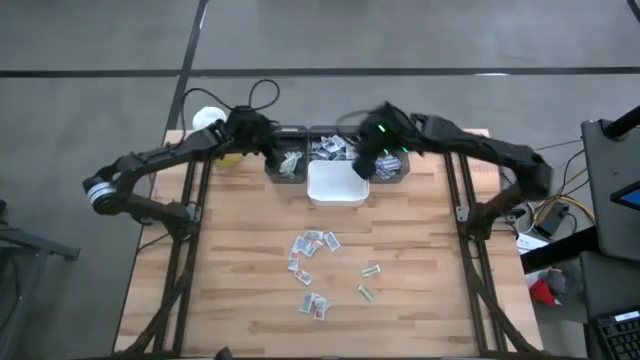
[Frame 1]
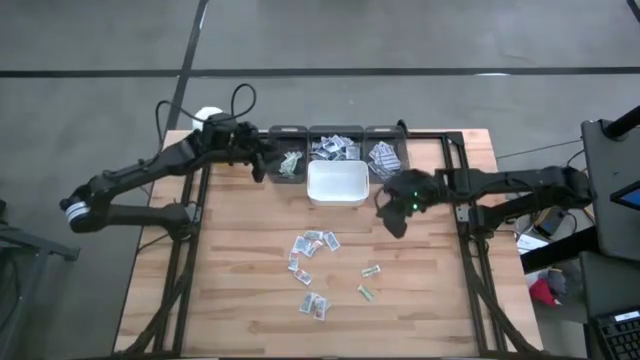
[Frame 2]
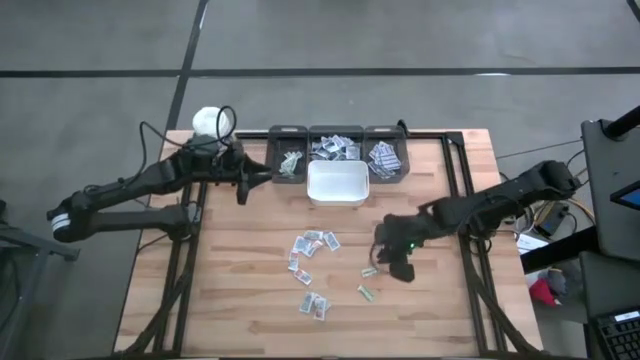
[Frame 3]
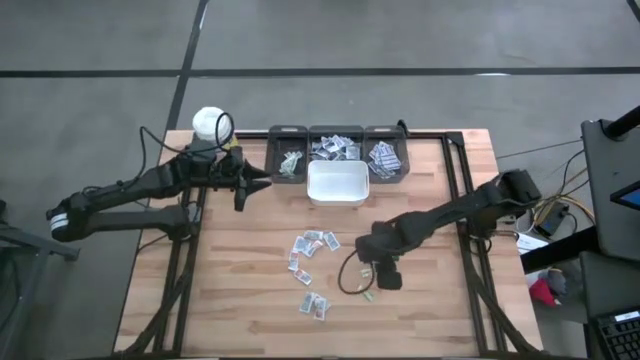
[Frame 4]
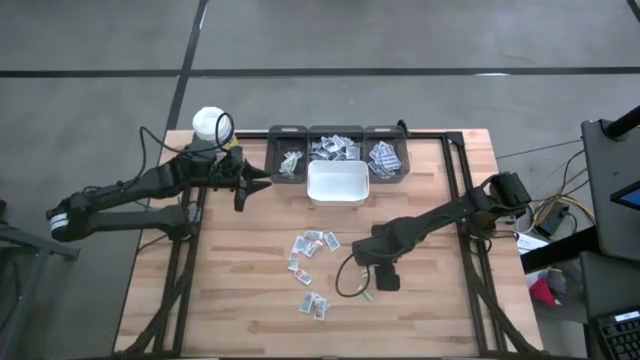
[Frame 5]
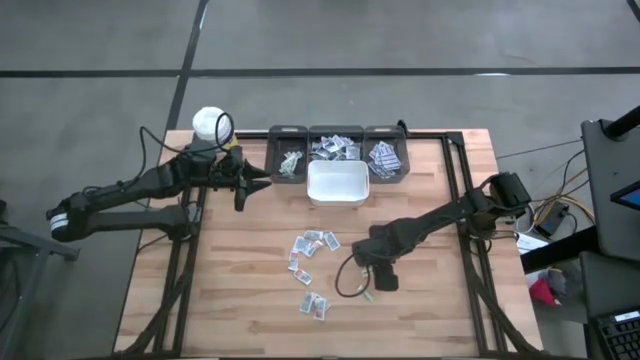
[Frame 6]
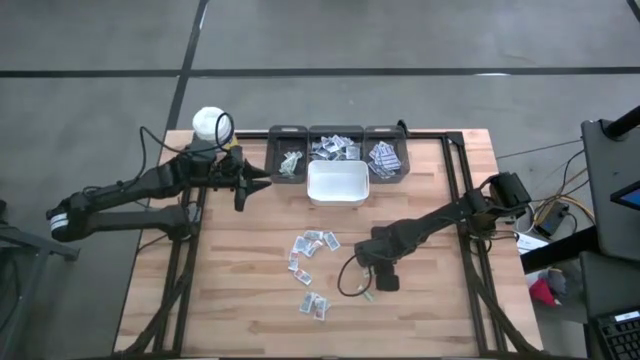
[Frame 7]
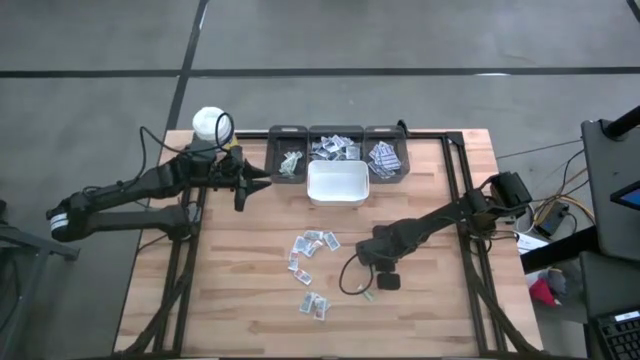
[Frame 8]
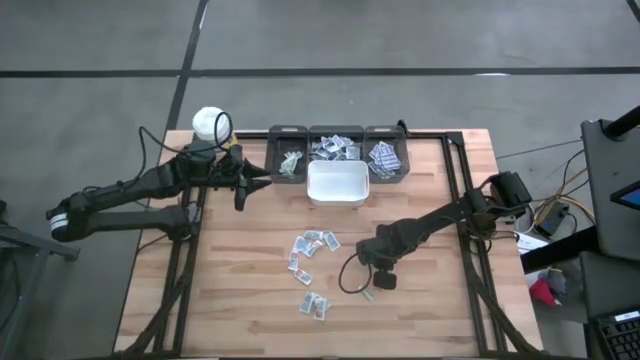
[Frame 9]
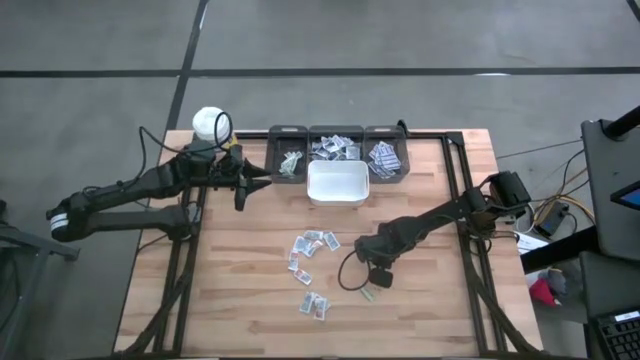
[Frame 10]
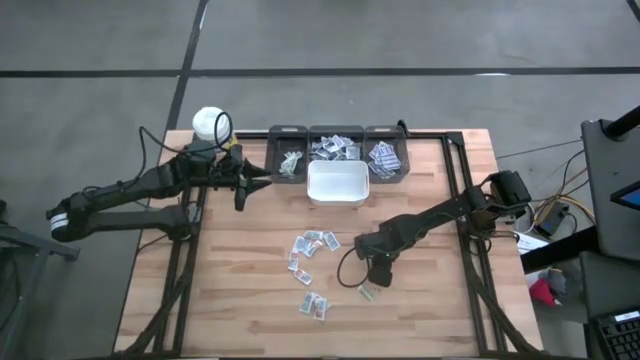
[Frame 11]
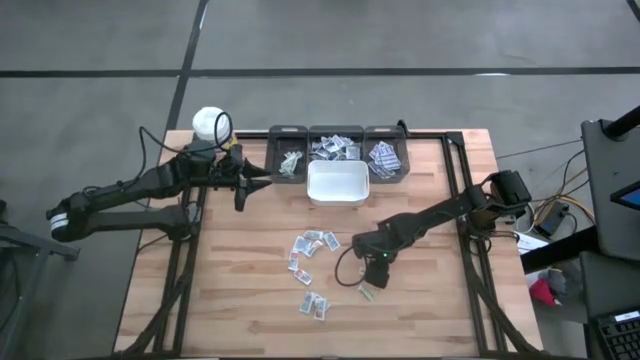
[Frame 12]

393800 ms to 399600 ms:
Task: Pick & Place First Aid Supplies
Put the top green bandage pack into the left black bin

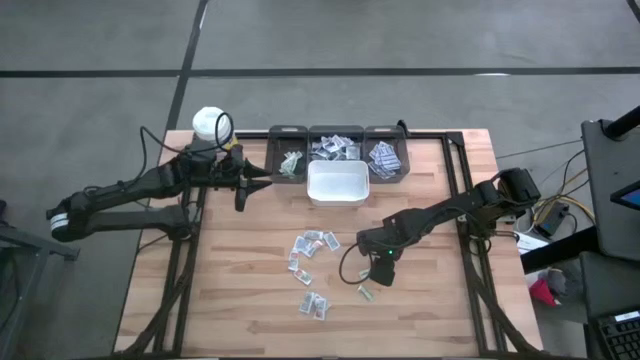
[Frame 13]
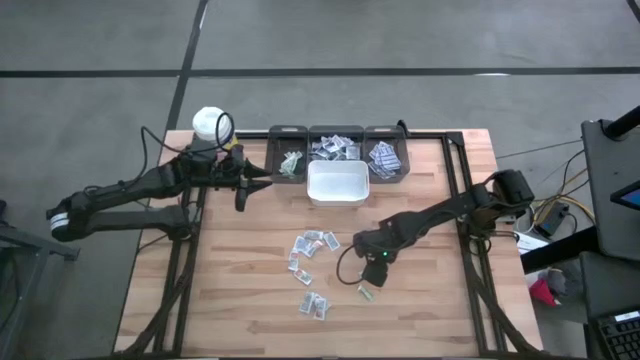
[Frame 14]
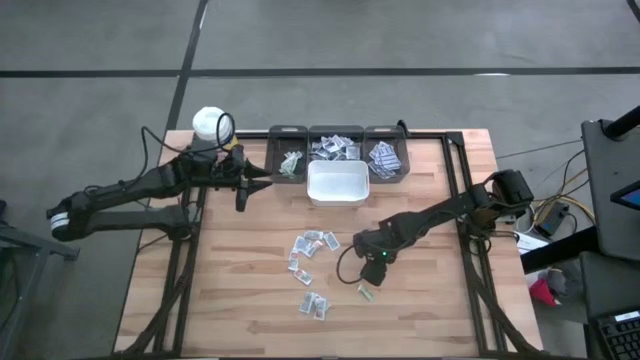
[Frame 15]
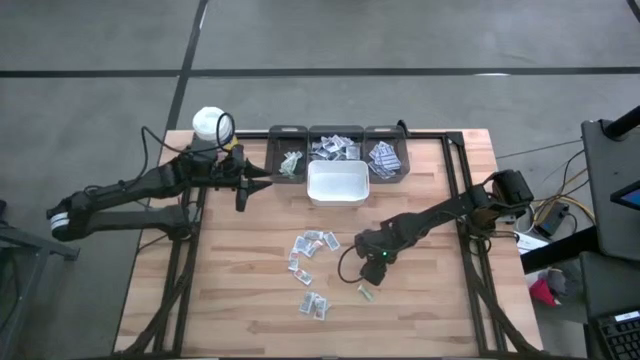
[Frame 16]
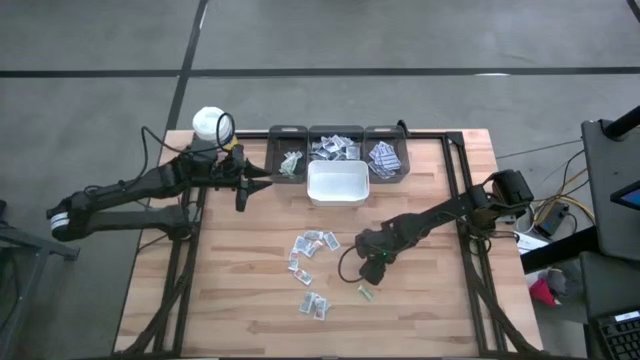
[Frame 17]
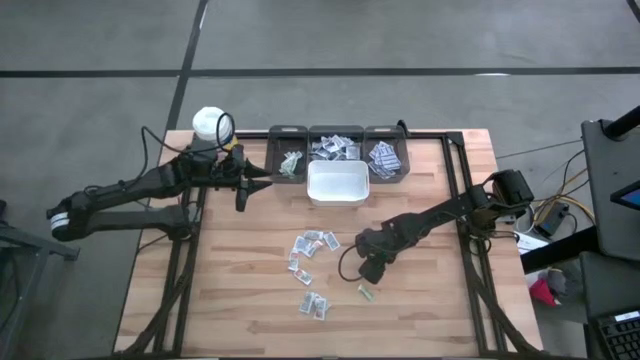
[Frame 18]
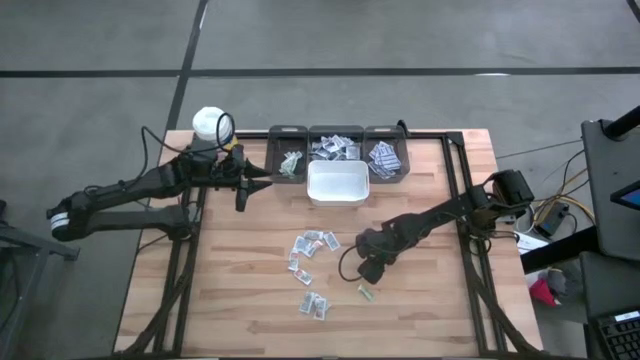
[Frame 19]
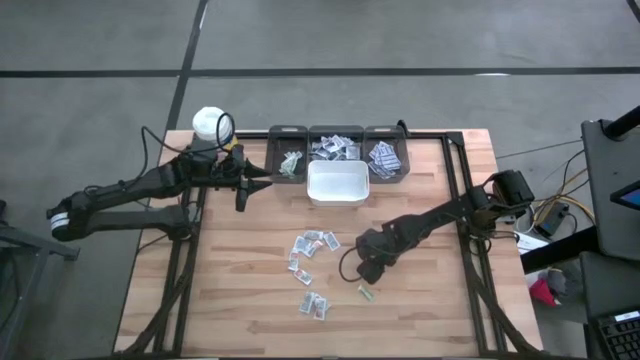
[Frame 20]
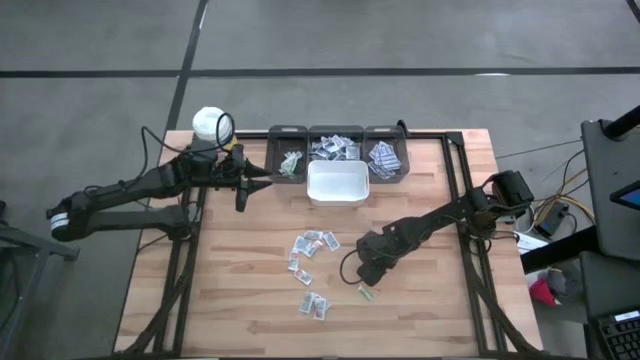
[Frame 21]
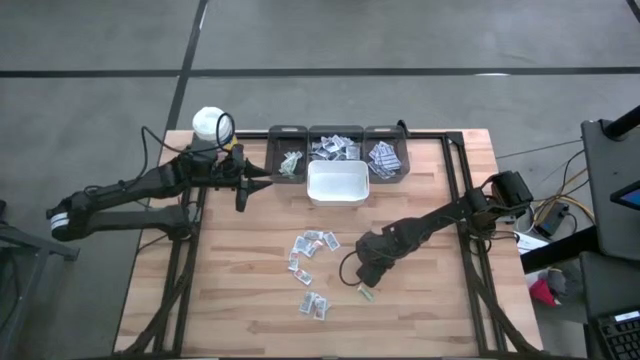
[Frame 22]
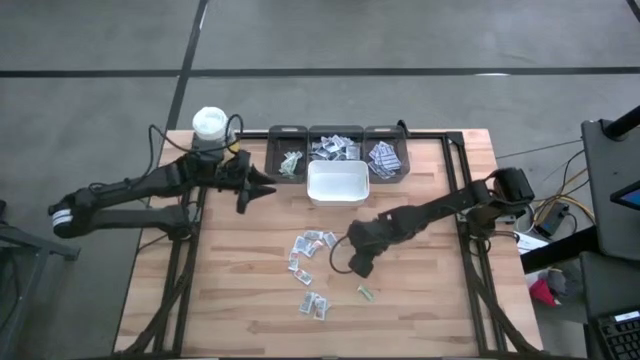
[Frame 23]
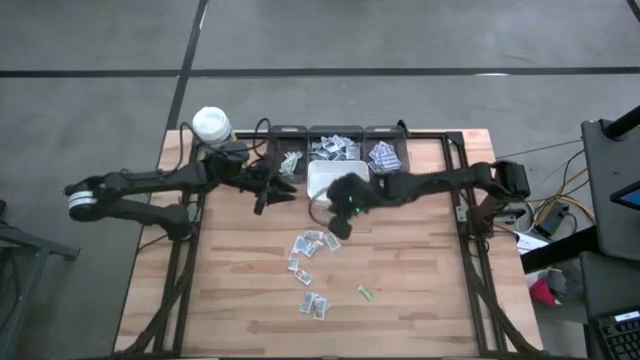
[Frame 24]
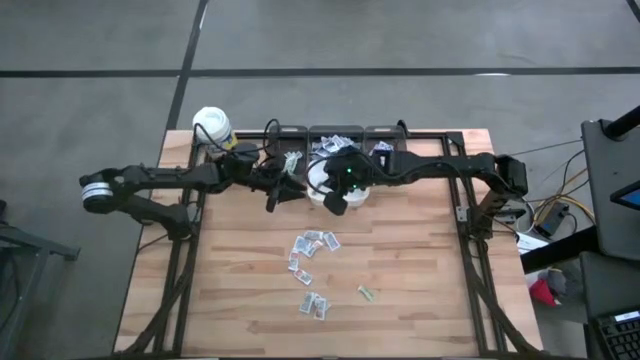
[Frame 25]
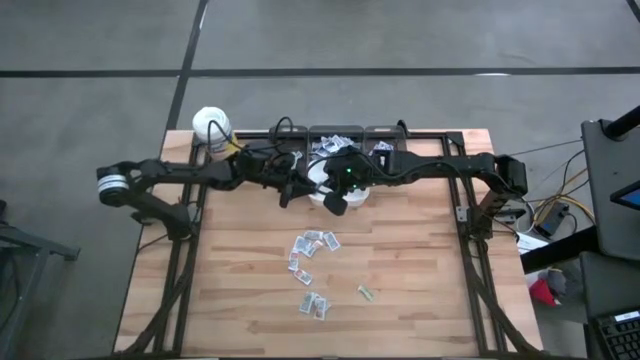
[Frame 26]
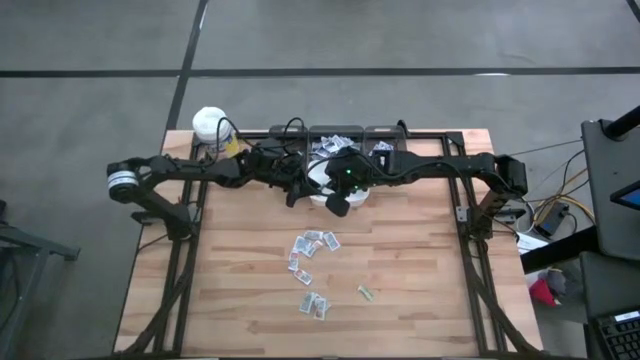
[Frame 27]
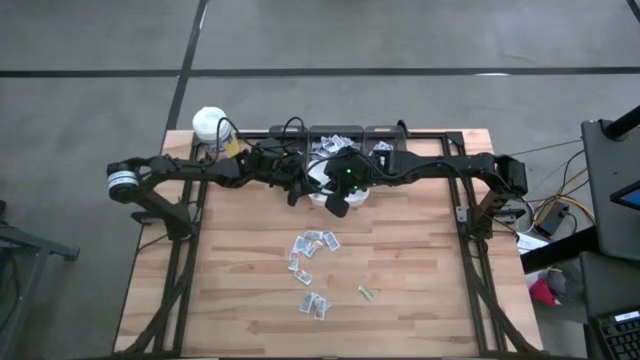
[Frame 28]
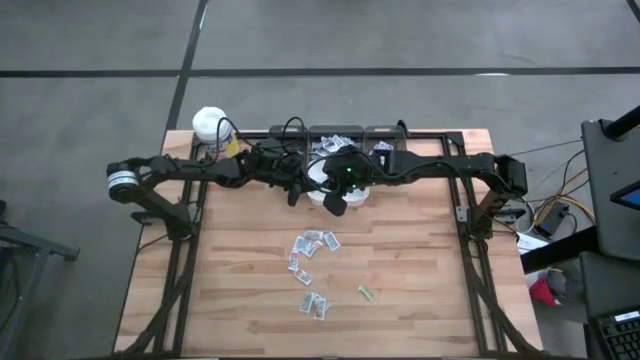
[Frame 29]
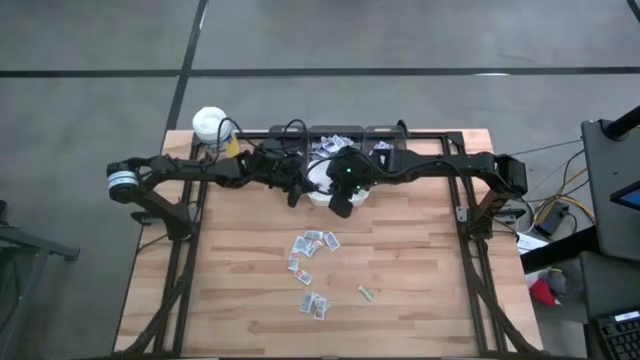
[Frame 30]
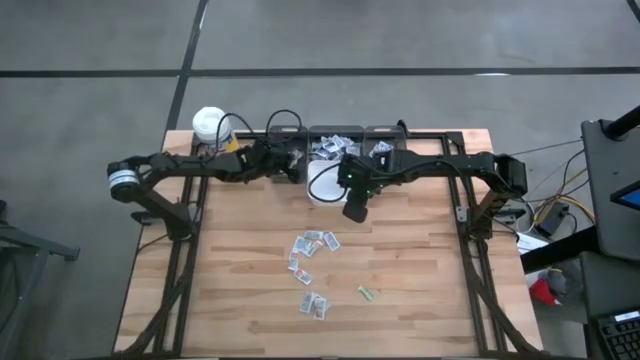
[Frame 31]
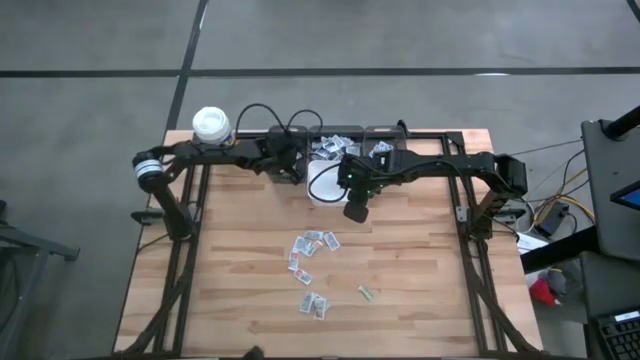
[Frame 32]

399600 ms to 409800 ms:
Put the green bandage pack into the left black bin

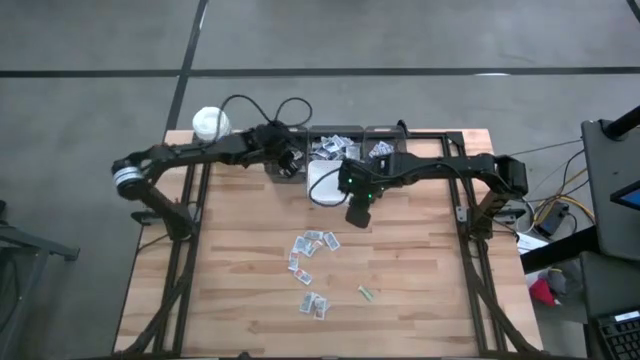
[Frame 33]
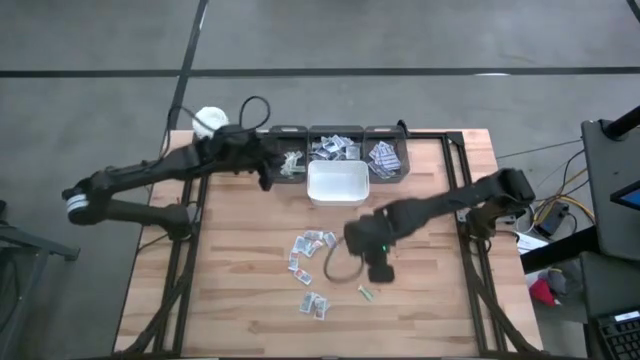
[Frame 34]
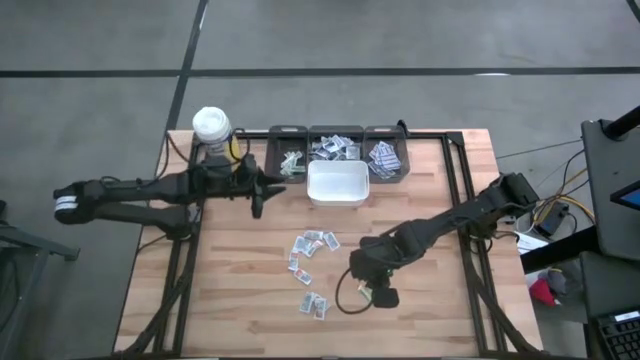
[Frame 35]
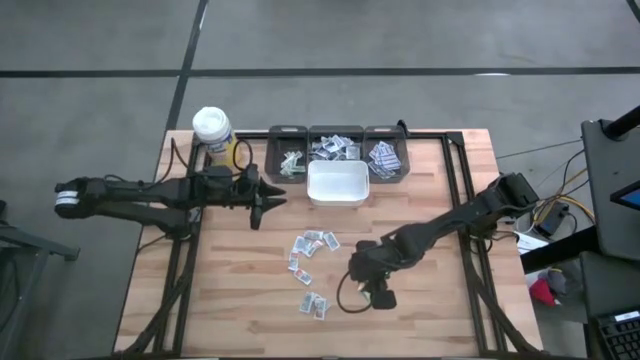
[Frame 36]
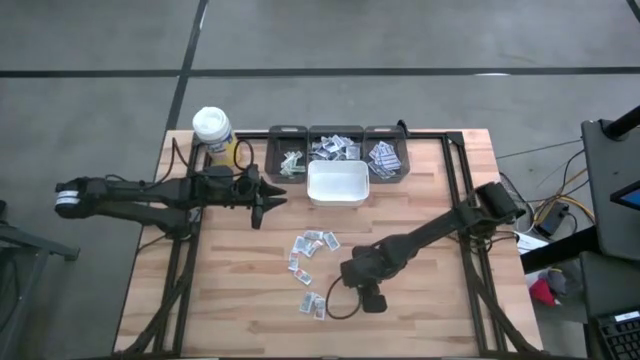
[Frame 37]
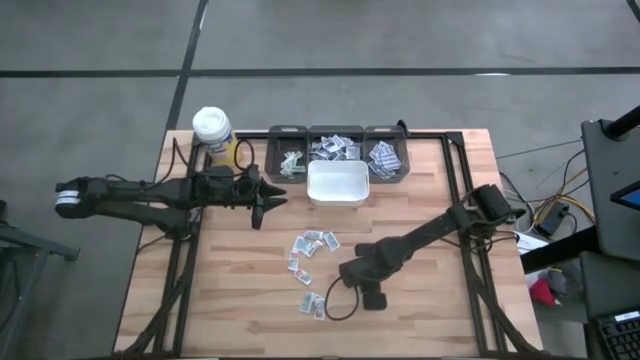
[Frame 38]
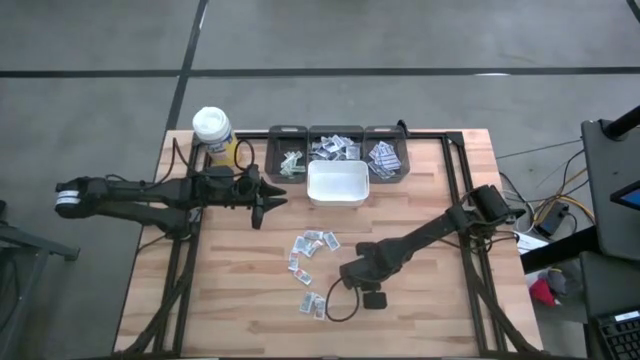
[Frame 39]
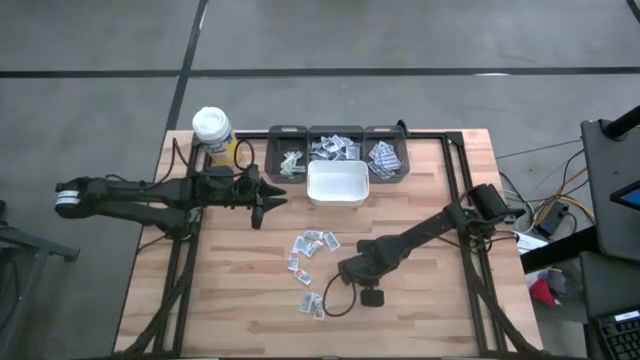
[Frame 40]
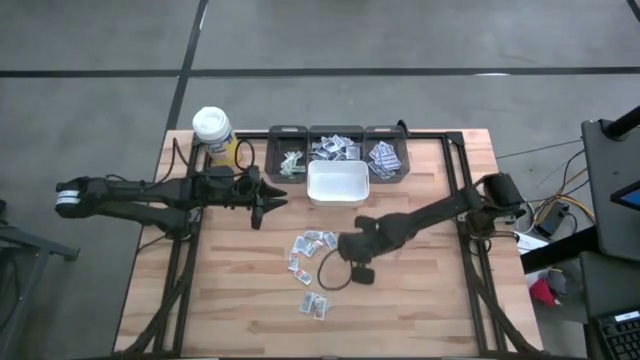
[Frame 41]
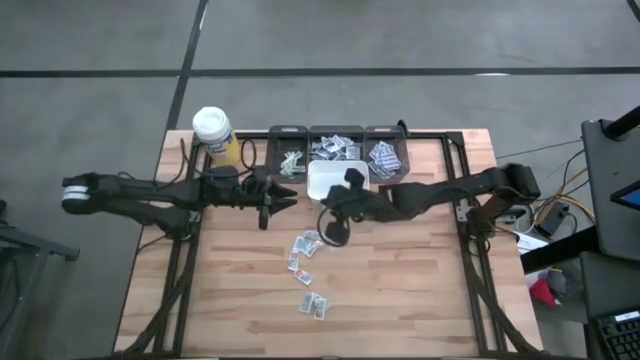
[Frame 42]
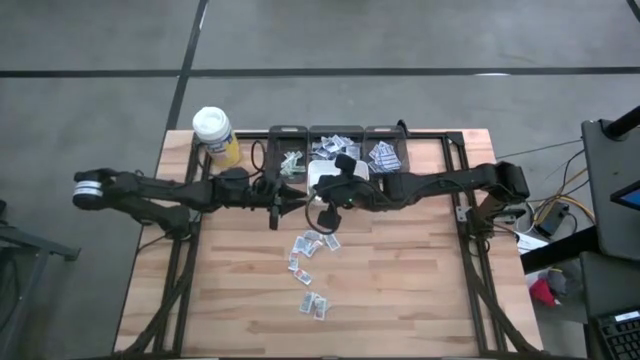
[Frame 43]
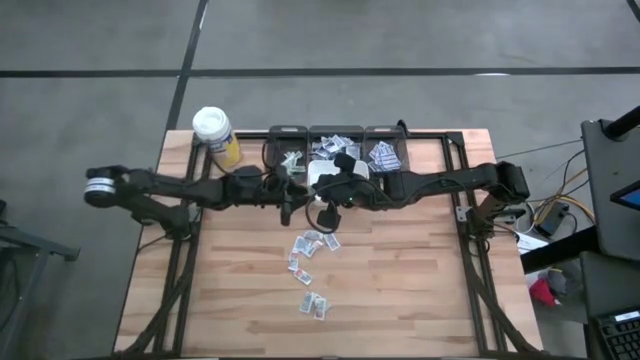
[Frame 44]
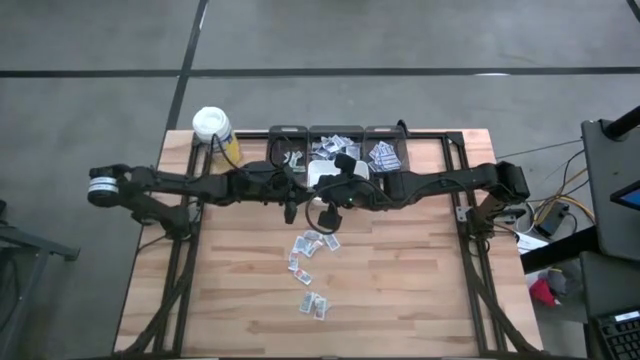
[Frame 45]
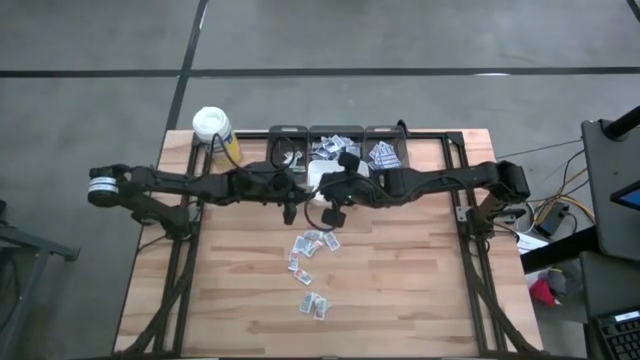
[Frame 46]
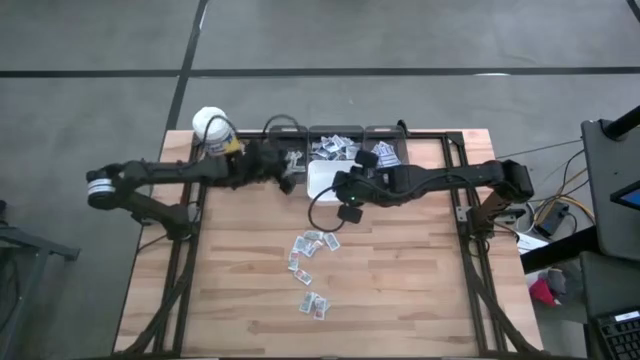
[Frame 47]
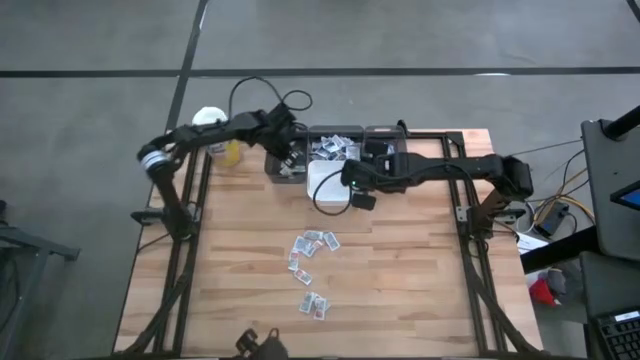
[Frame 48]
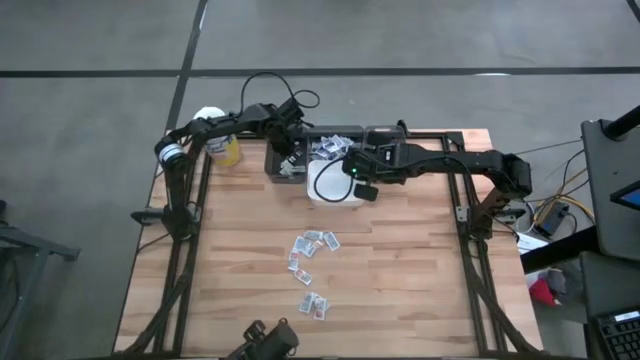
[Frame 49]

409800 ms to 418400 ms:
Put the green bandage pack into the left black bin
